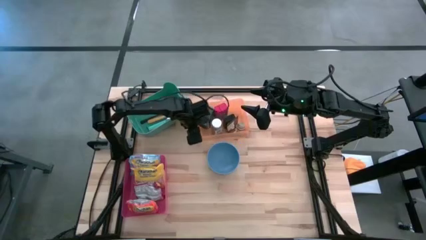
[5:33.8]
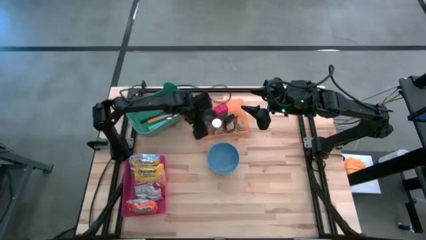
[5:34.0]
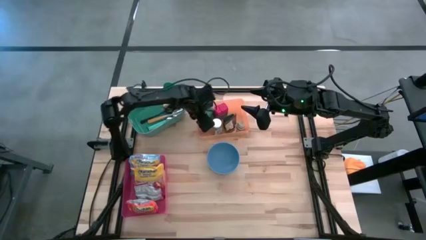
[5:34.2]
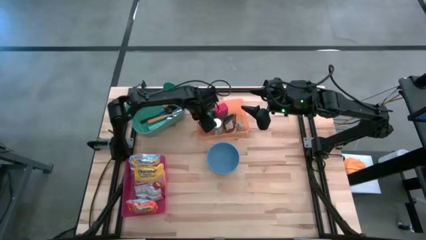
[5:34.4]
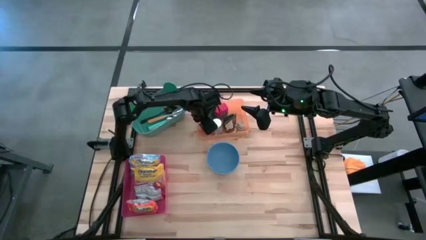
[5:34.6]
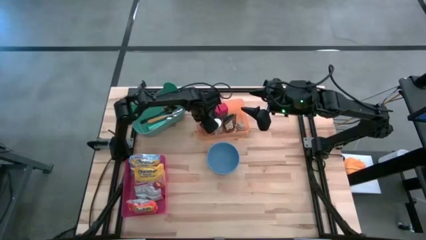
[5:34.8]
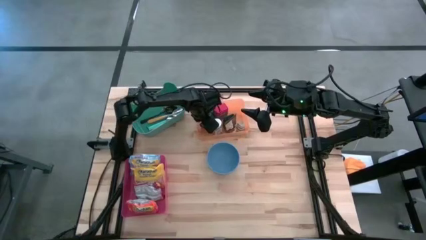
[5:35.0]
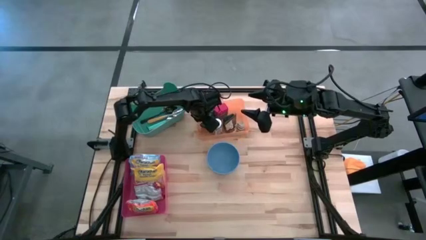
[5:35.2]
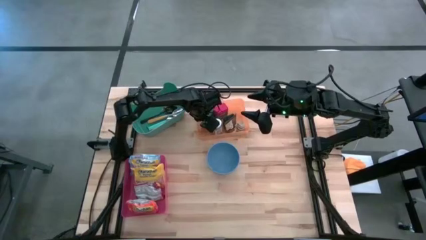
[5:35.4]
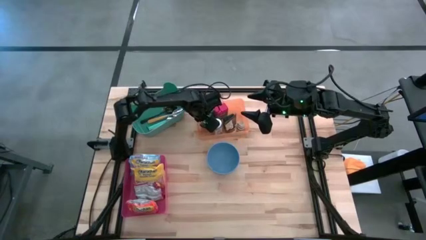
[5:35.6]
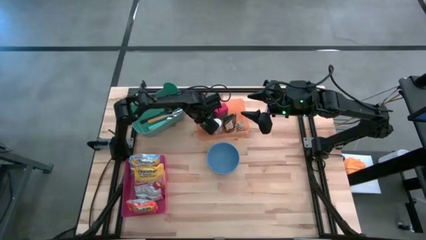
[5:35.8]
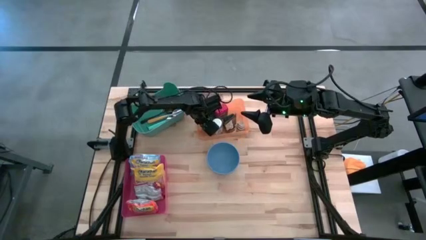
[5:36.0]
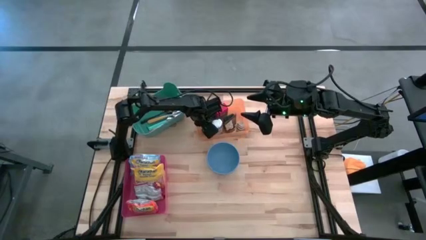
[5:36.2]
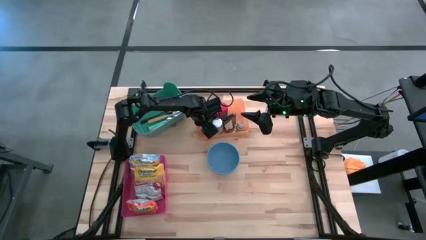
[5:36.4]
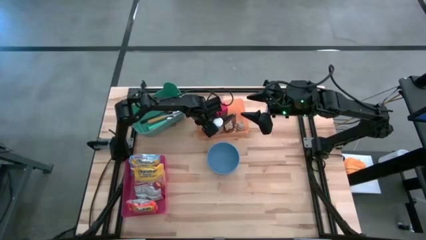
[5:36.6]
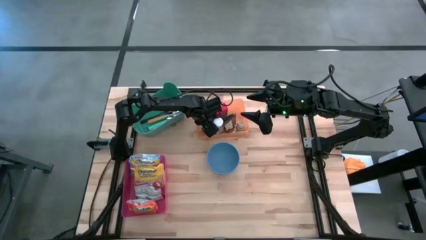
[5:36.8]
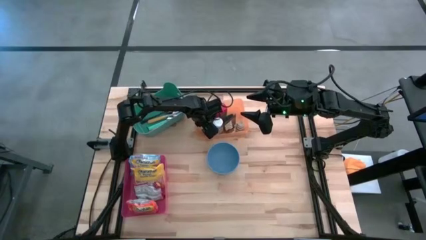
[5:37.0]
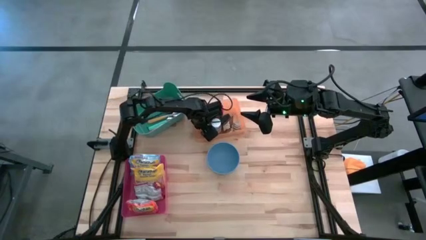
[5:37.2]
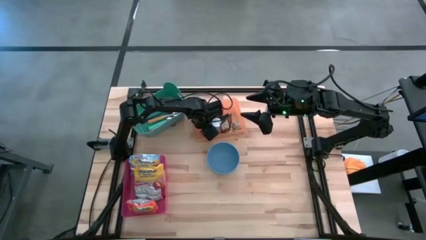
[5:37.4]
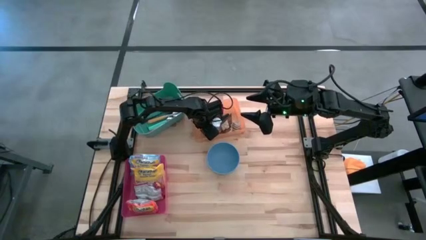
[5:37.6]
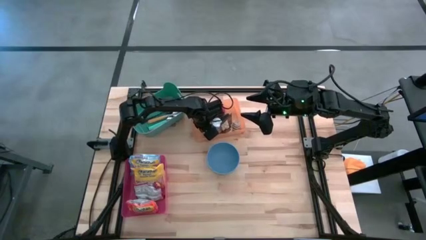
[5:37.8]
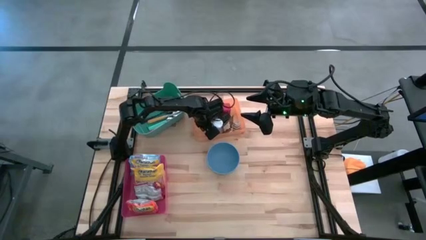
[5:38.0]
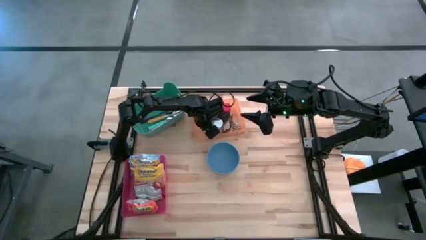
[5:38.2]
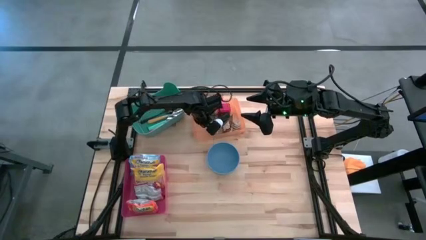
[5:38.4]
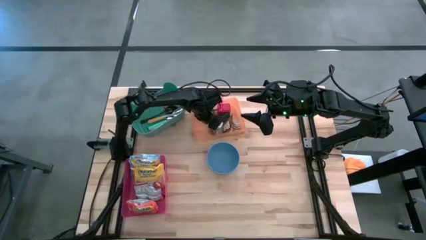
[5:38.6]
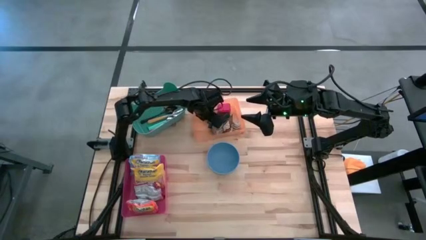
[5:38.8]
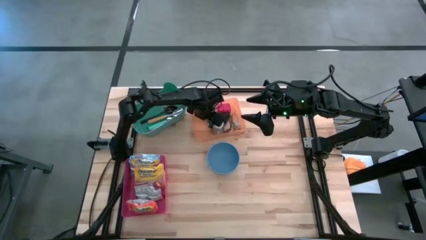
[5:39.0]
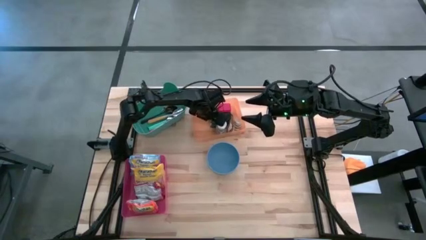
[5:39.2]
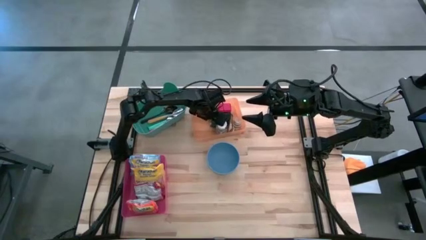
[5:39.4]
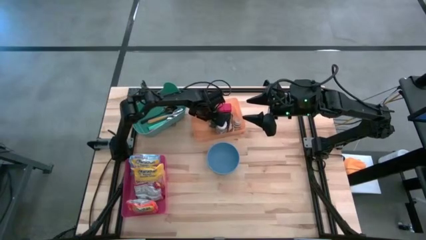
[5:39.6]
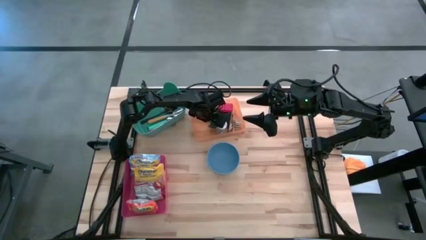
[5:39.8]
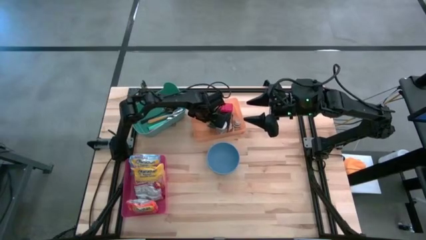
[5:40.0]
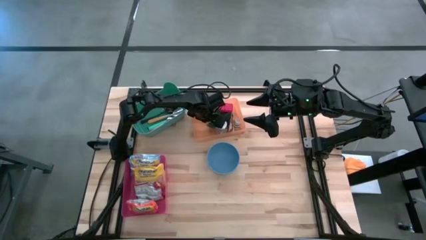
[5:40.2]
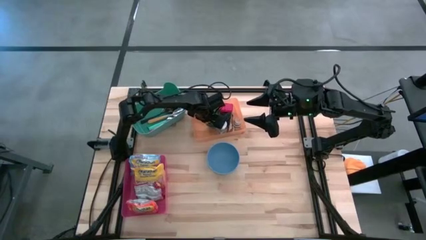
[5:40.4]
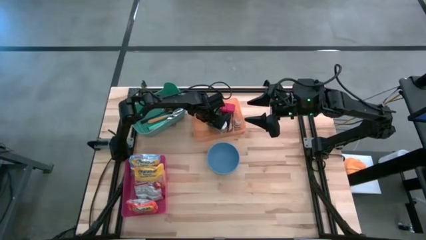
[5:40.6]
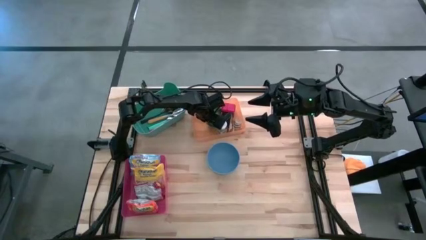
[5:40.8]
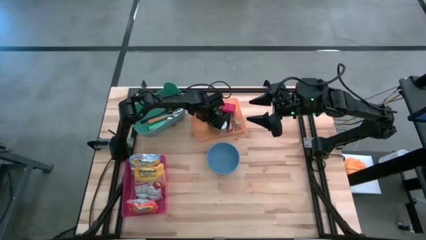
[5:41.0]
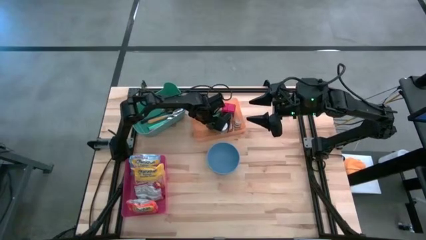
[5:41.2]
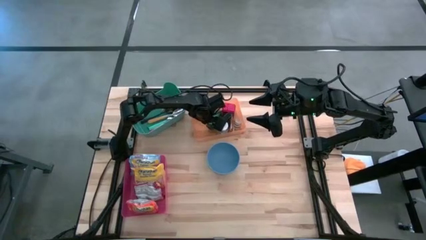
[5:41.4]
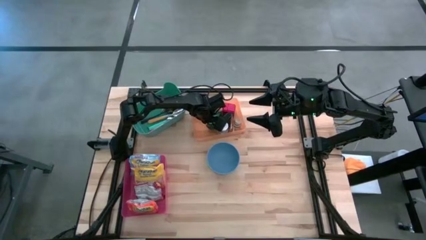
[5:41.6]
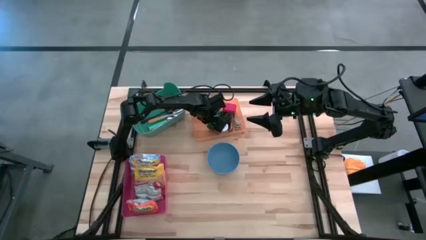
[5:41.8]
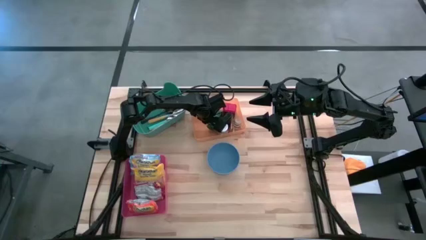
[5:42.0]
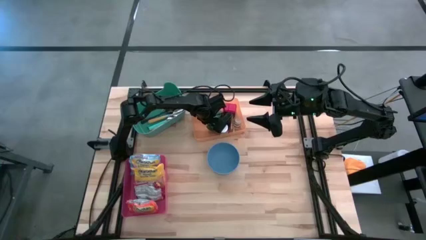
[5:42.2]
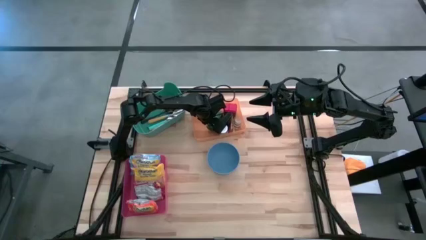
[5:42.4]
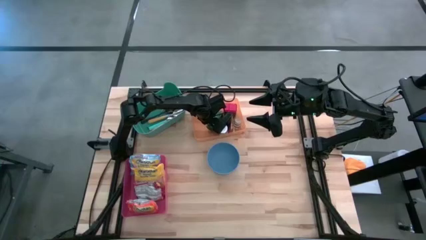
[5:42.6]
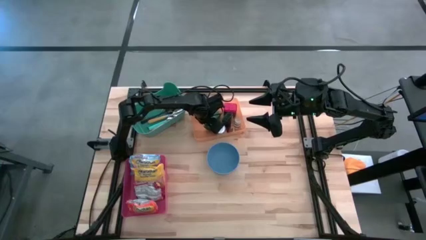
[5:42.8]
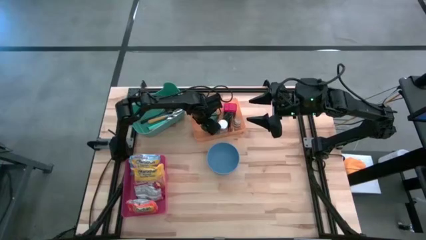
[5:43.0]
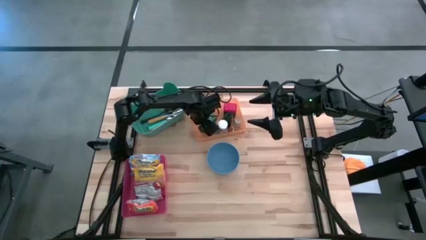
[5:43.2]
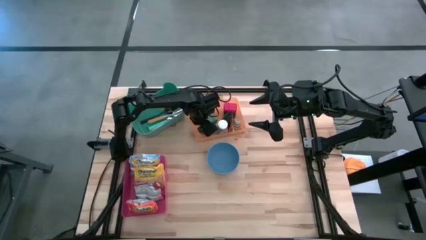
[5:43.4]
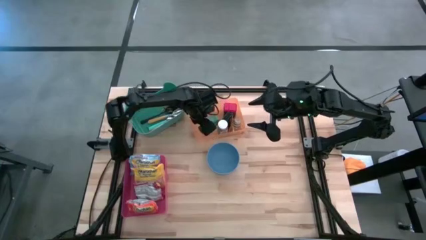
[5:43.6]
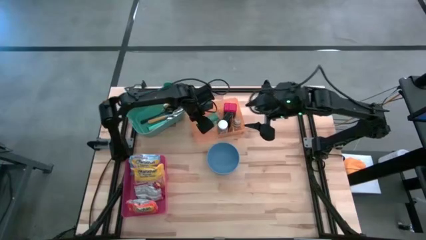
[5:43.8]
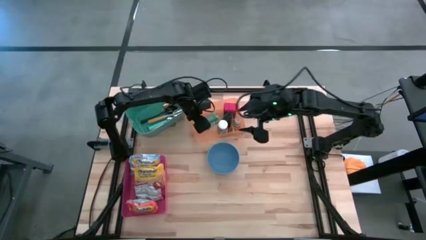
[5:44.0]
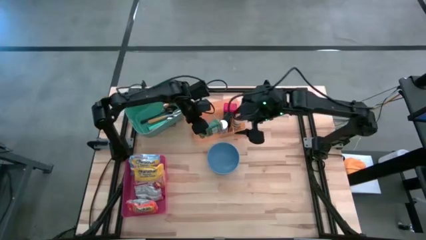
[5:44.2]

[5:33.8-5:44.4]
Put the green spice bottle into the orange bin
